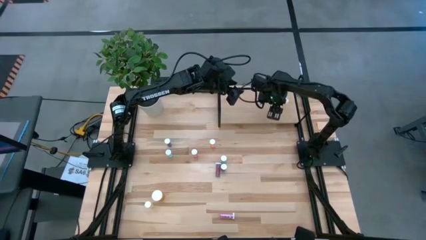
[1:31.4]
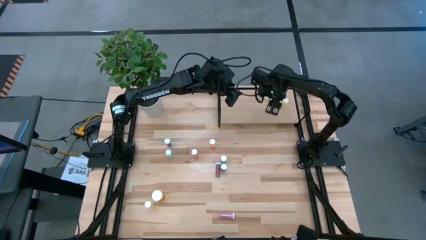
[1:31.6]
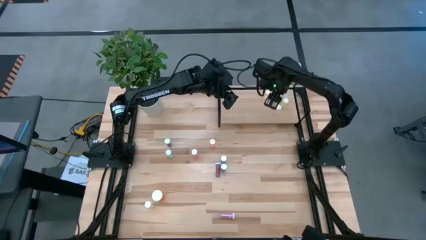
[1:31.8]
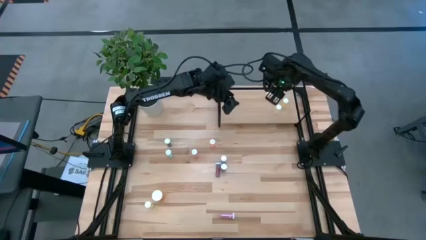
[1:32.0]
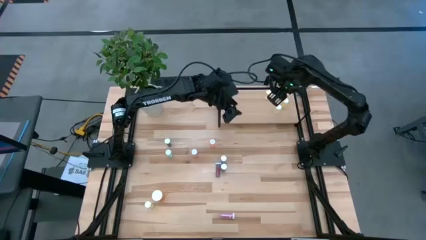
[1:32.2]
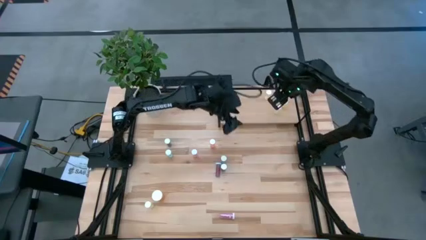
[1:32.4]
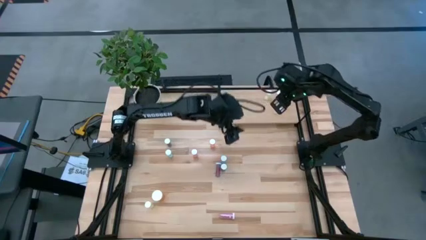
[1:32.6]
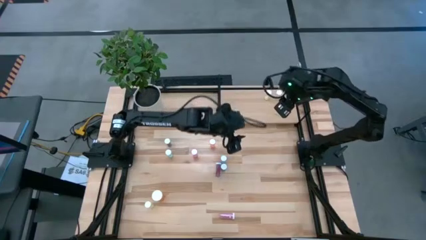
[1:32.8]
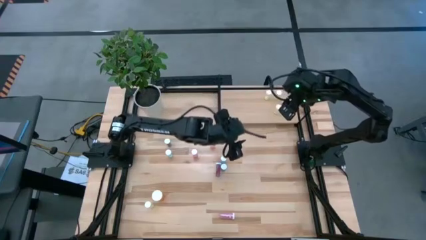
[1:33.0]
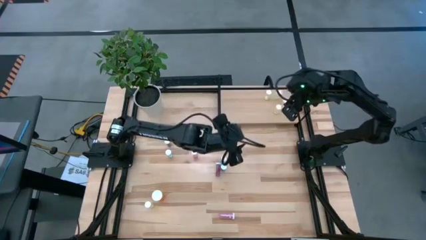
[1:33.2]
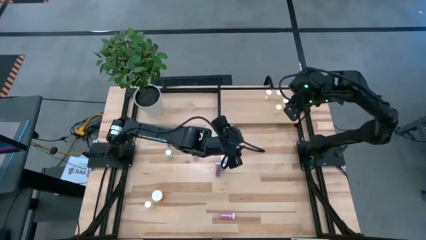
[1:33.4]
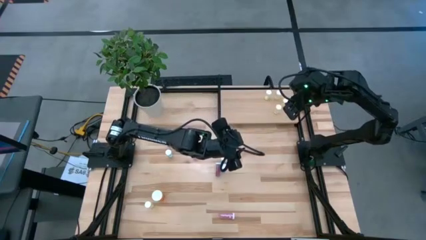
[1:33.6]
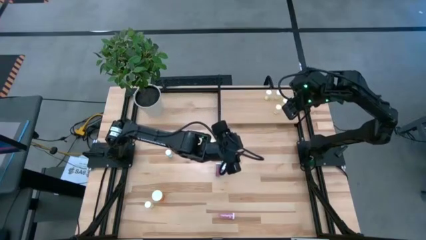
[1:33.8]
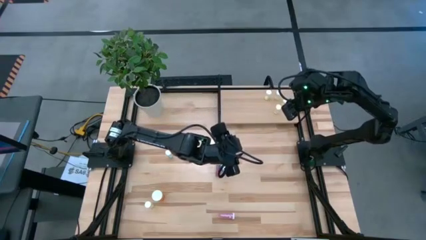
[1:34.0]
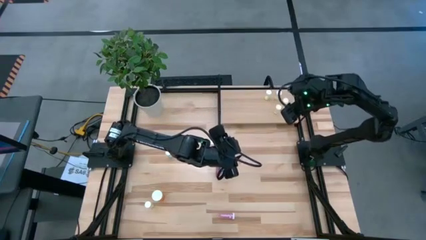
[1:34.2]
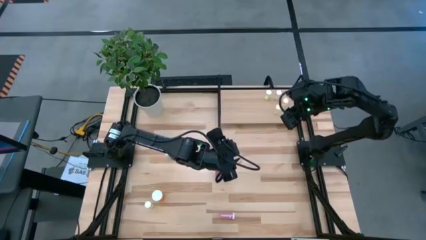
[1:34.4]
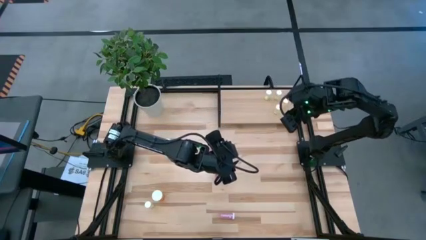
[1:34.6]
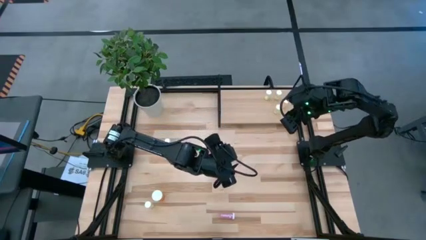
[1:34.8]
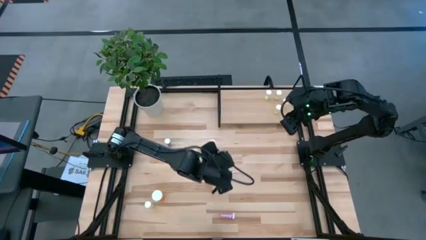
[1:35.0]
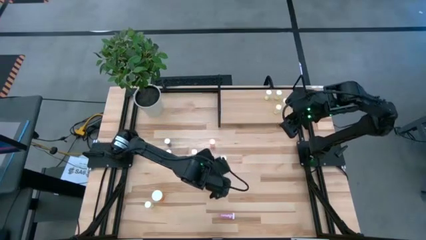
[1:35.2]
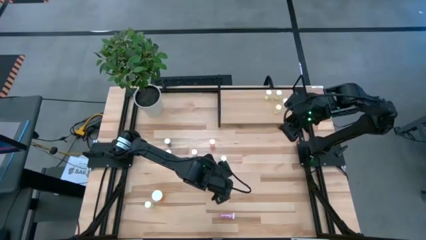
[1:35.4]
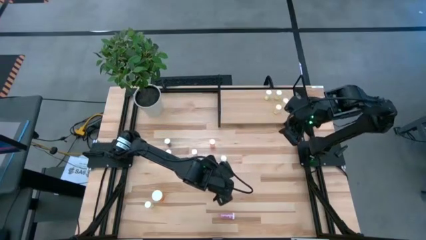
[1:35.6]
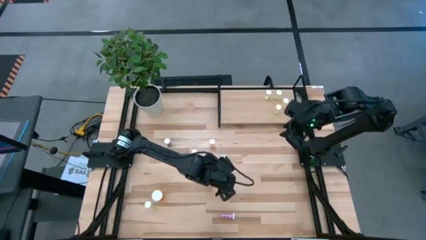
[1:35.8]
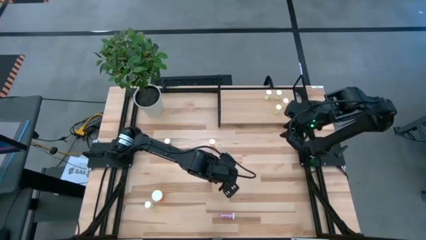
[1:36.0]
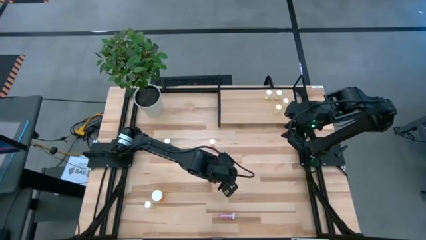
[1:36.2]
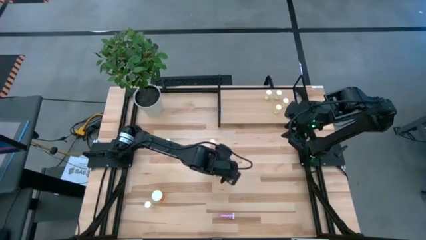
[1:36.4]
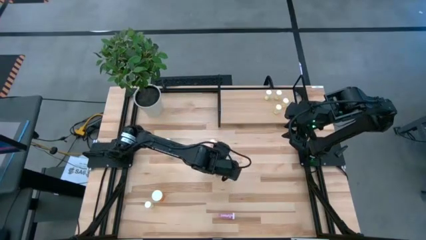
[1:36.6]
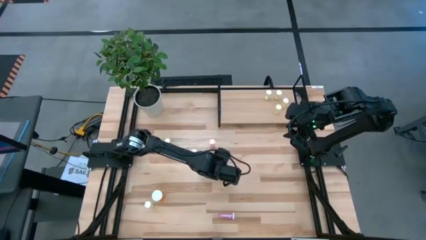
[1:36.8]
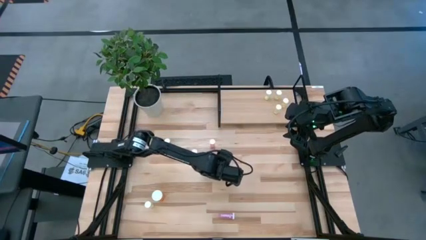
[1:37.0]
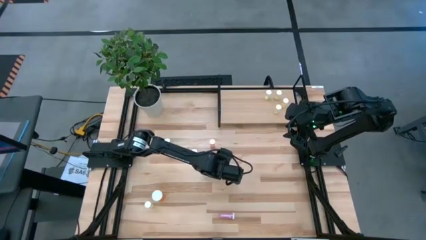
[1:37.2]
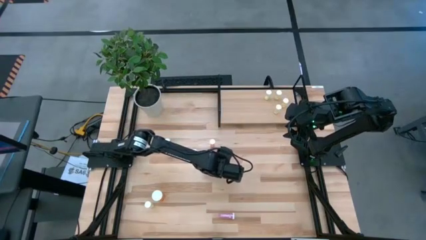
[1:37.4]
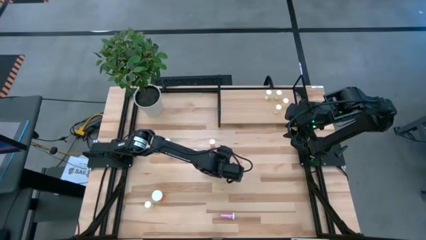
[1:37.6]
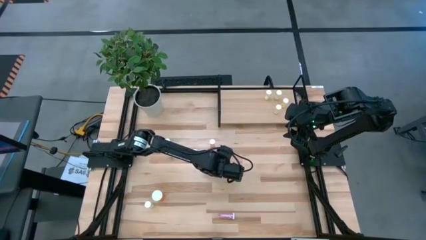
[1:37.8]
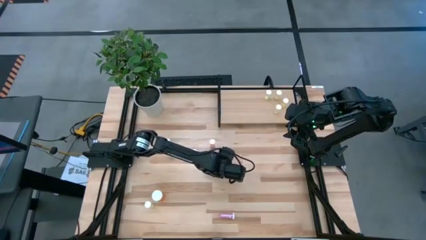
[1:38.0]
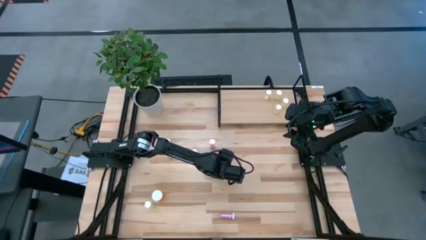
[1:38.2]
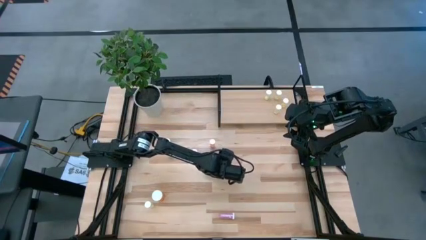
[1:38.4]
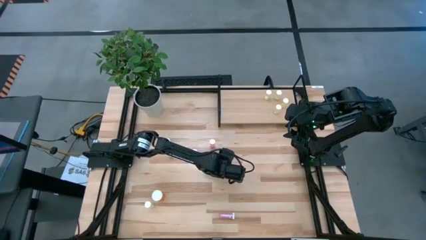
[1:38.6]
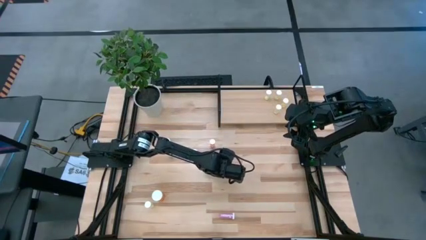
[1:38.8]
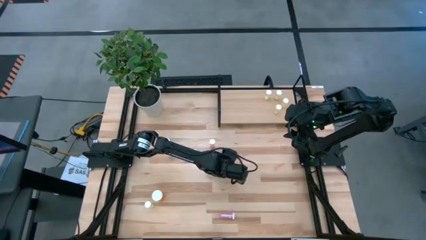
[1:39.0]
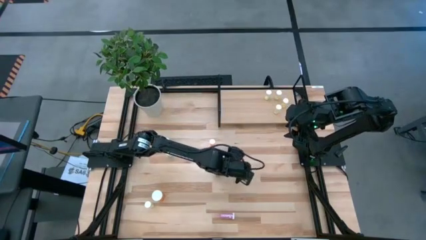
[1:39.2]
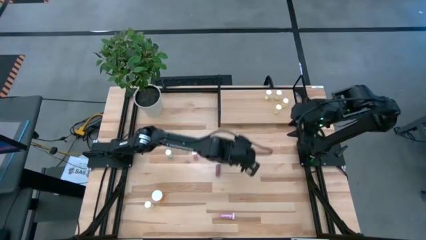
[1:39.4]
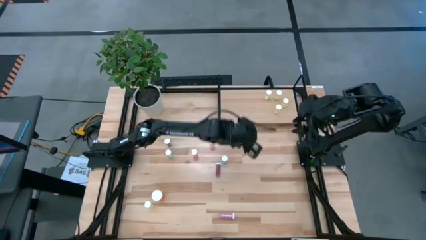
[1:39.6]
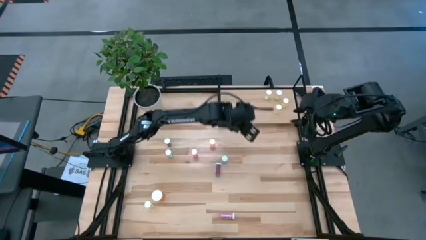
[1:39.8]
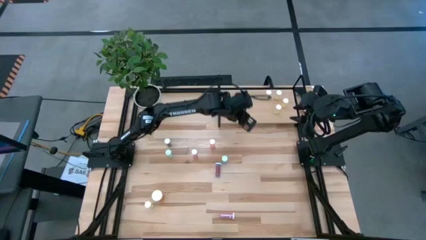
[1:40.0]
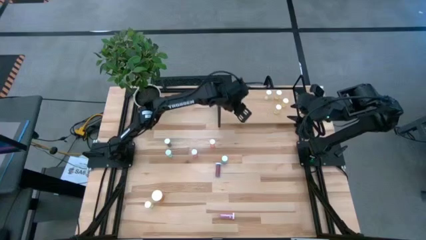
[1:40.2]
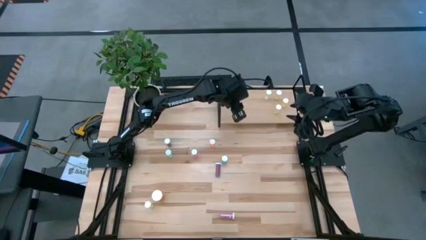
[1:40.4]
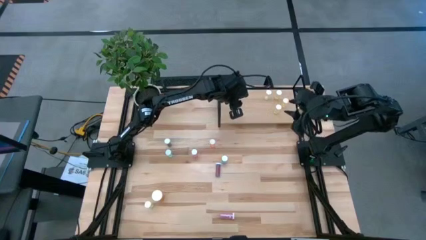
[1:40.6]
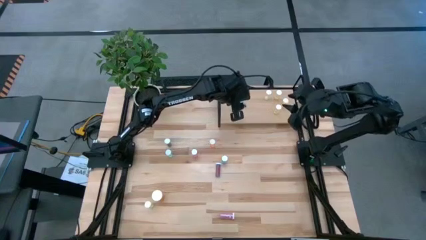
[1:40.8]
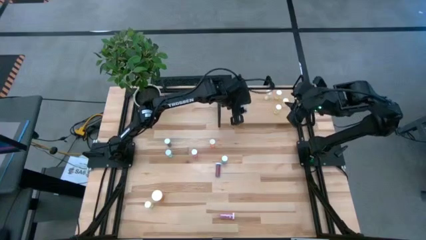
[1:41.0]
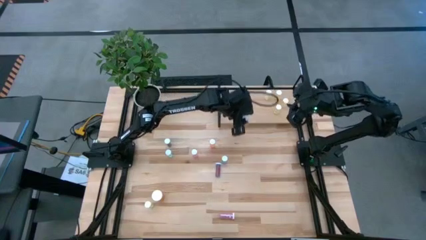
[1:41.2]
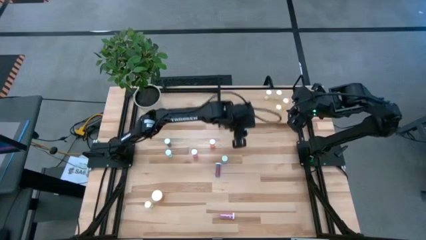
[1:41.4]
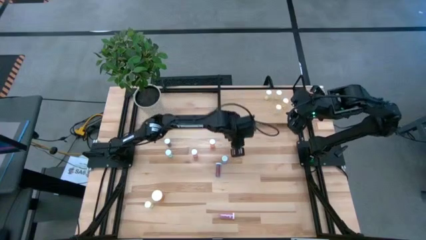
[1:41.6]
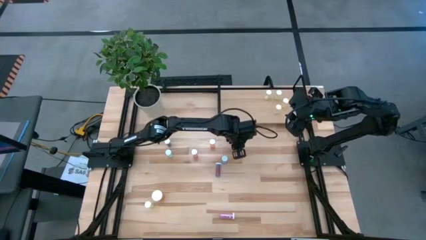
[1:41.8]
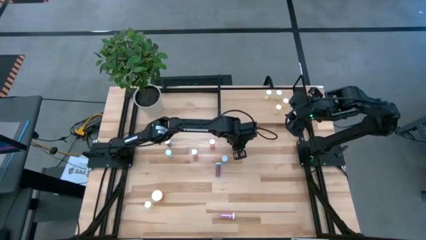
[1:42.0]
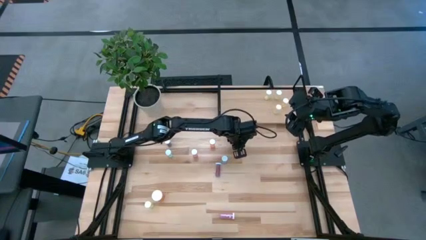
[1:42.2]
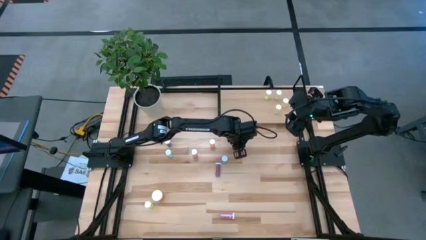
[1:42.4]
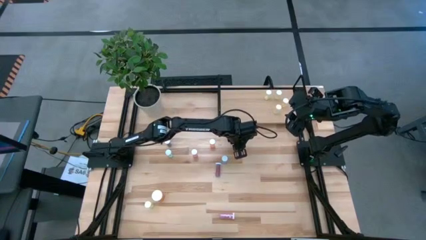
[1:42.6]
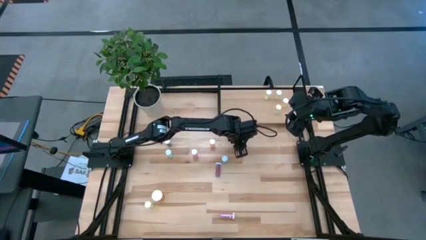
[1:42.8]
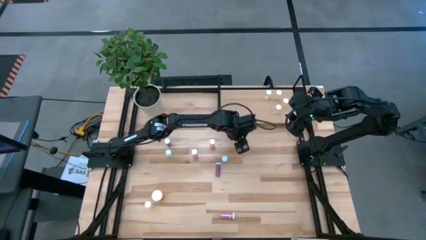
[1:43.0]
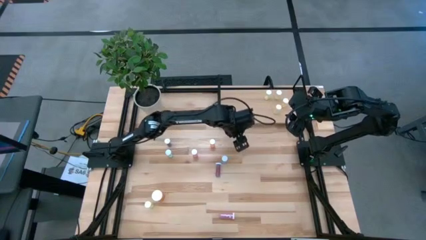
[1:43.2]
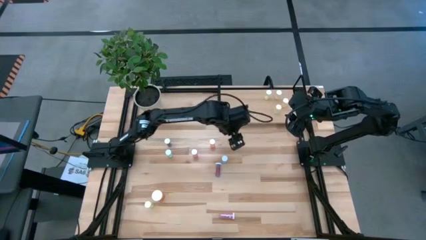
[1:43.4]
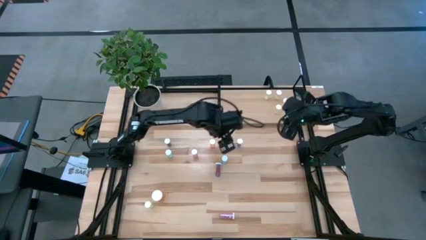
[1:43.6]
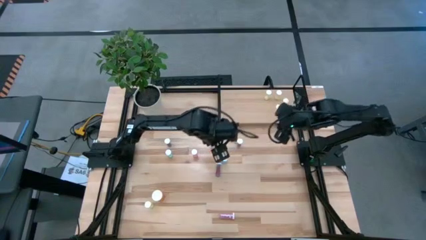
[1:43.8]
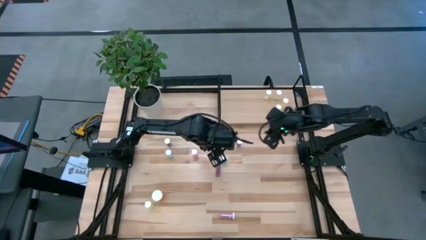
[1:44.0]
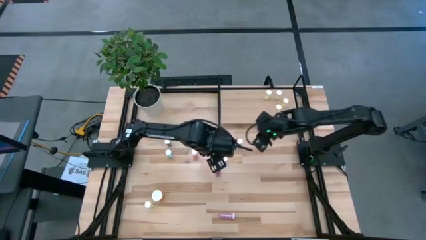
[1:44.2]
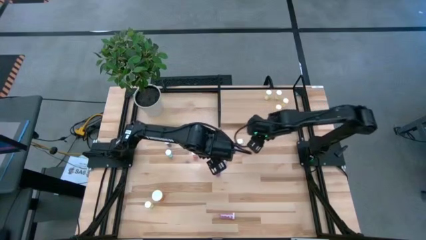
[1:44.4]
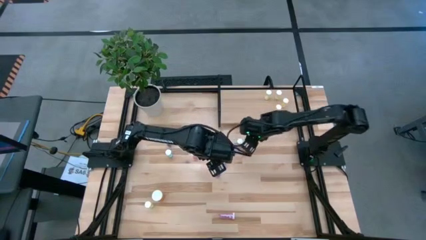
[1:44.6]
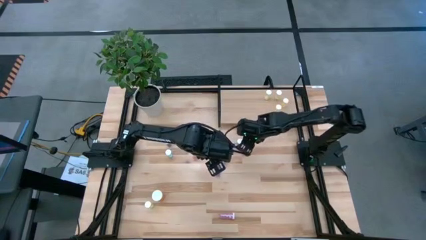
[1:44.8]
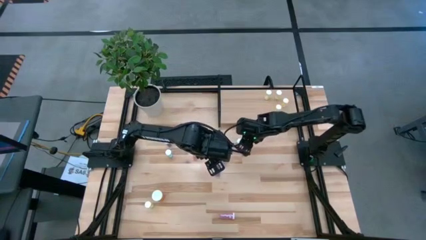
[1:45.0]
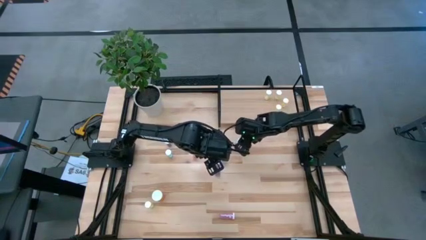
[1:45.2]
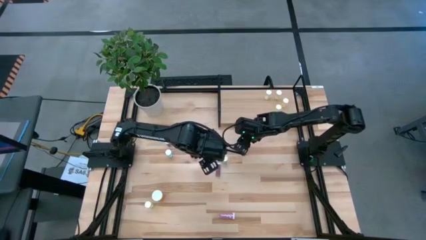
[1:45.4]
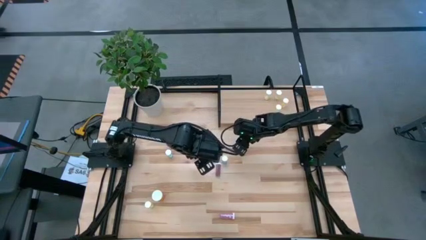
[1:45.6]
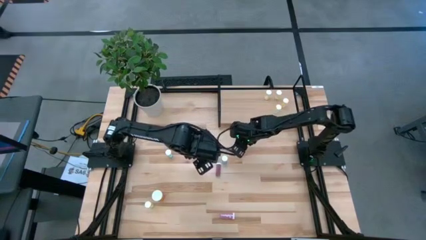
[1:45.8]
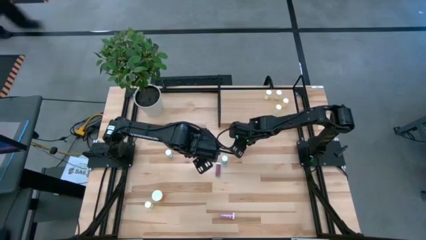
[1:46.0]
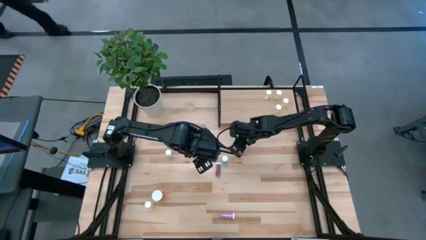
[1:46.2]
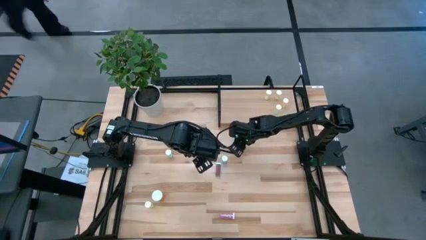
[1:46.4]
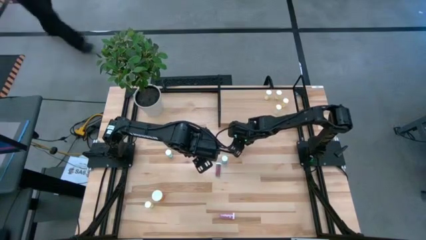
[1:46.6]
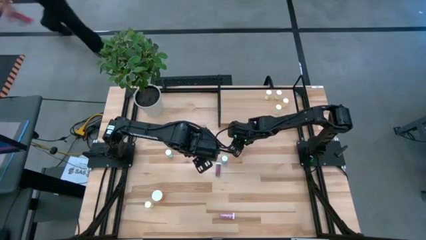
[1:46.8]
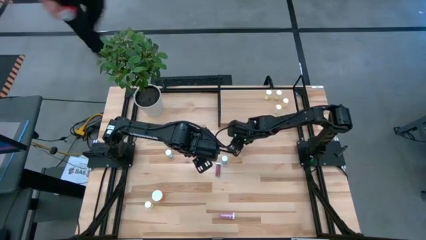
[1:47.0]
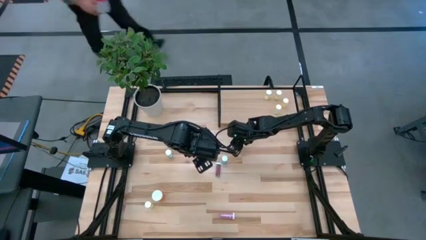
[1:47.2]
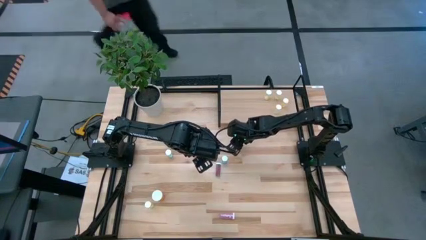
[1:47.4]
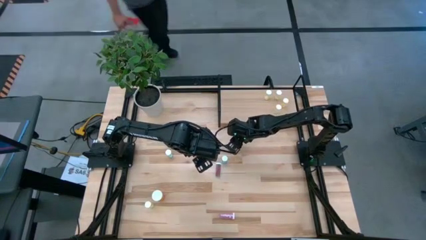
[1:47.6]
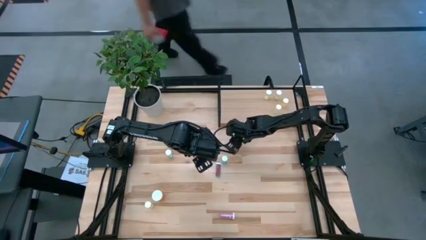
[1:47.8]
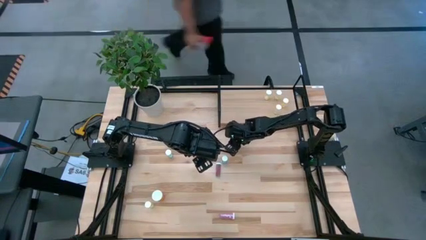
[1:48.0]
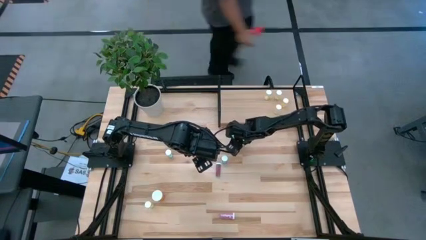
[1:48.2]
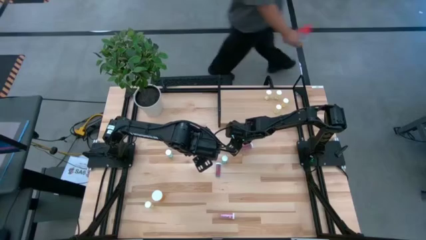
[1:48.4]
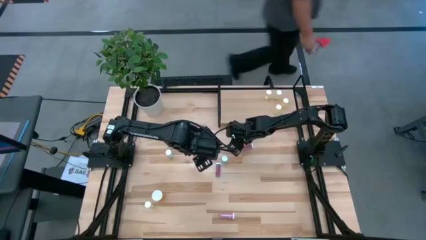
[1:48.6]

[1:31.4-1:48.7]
Task: Pick and place medicine bottles onto shelf by color
Put the blue pill bottle on the shelf
